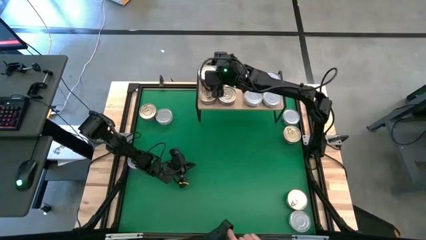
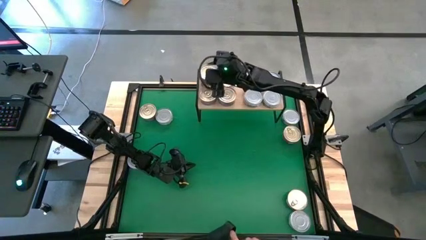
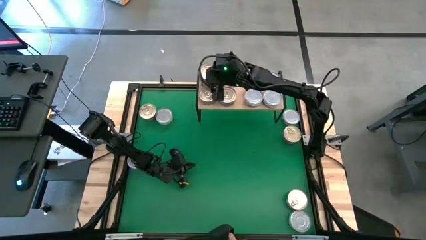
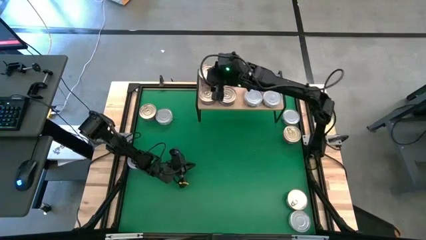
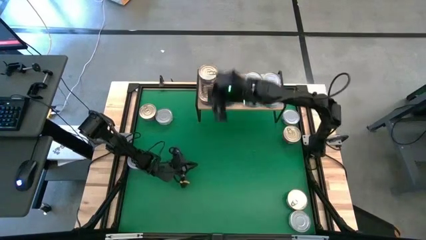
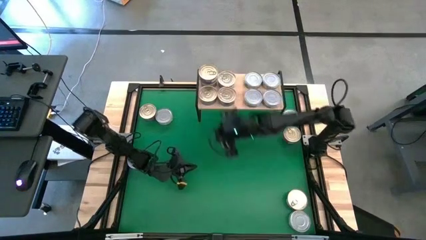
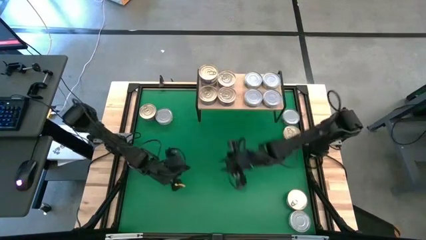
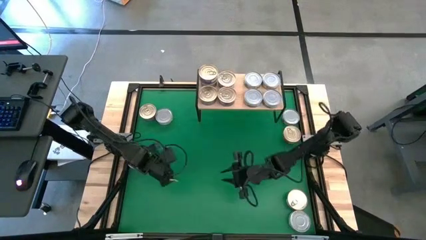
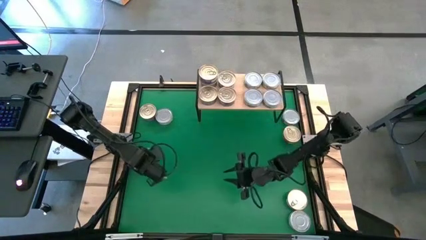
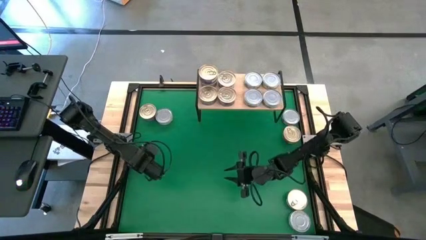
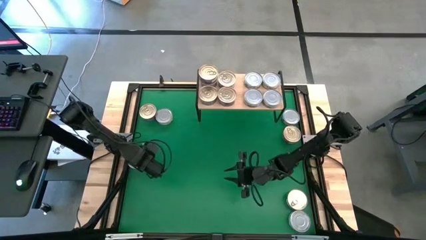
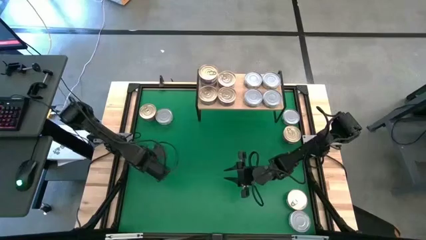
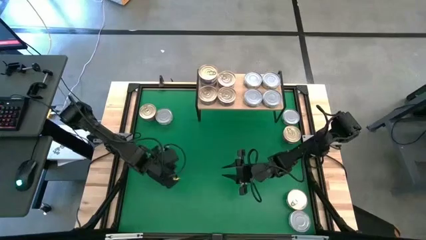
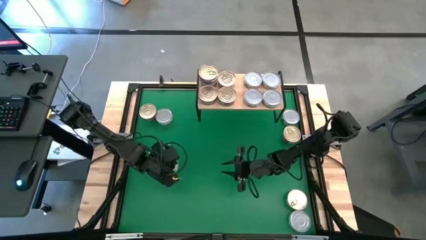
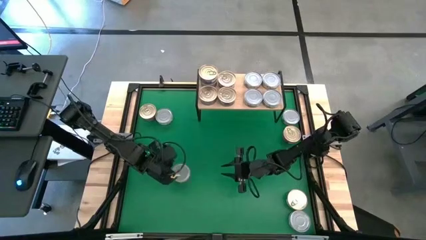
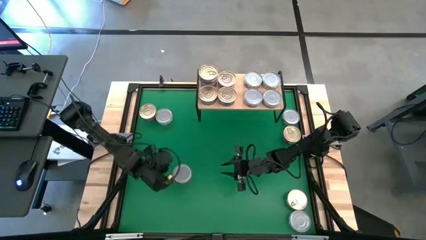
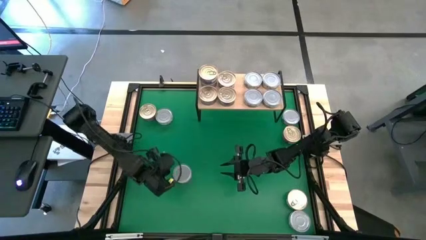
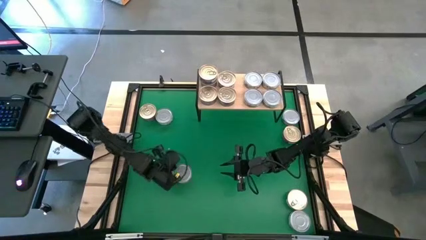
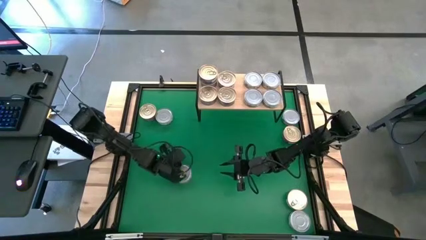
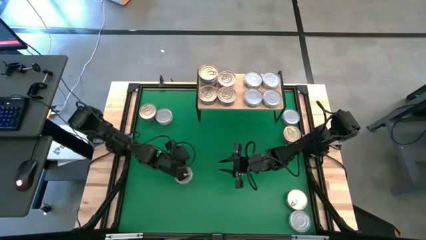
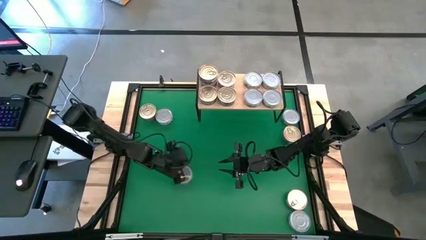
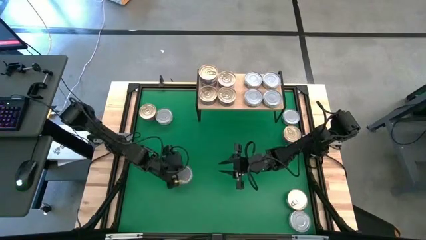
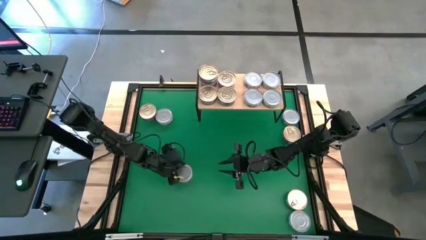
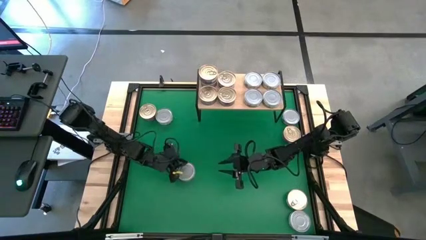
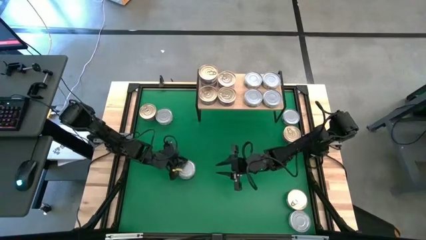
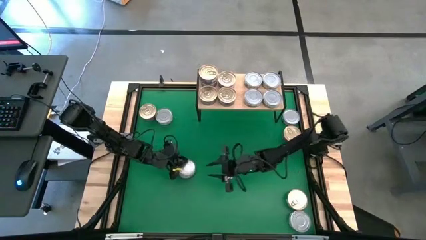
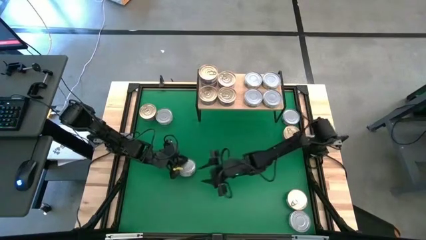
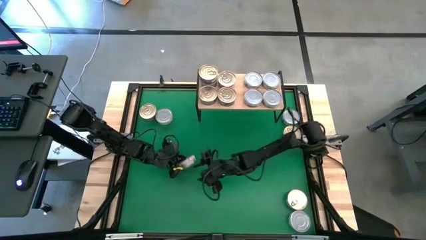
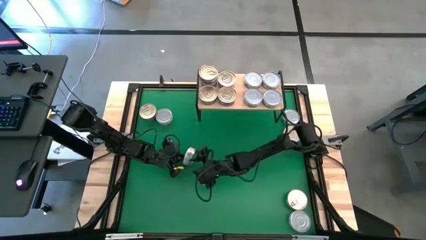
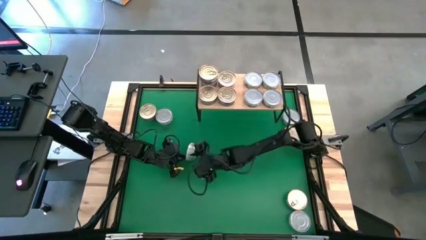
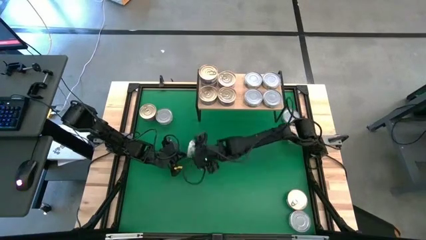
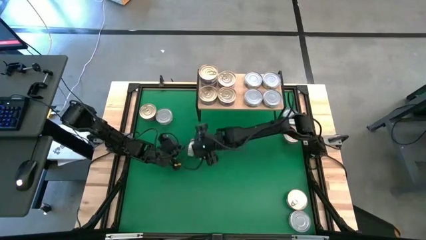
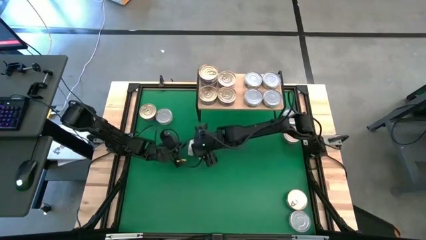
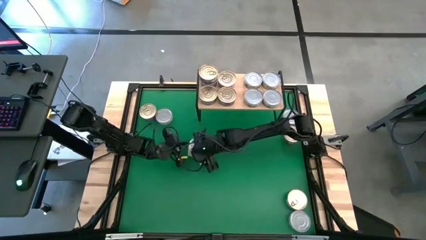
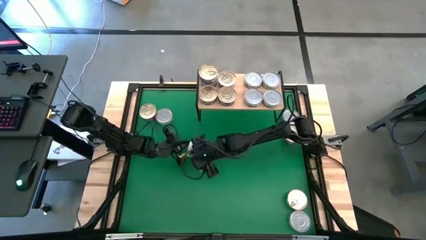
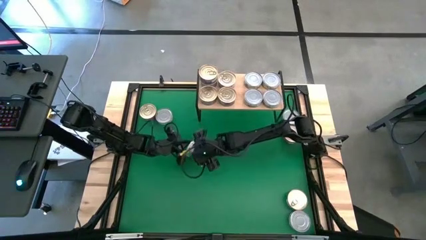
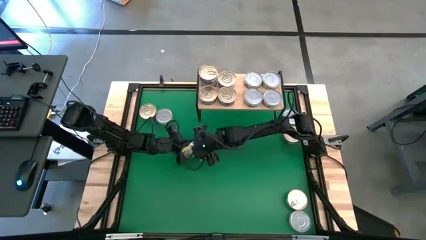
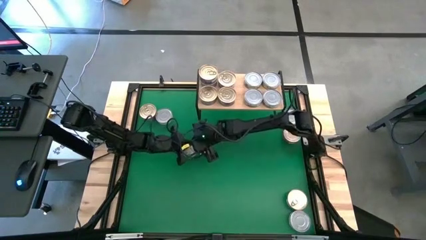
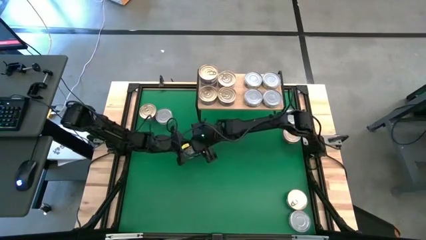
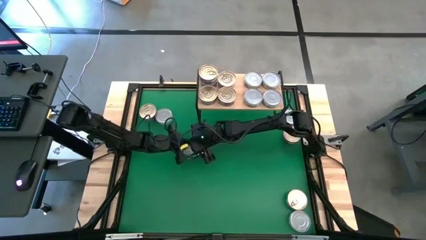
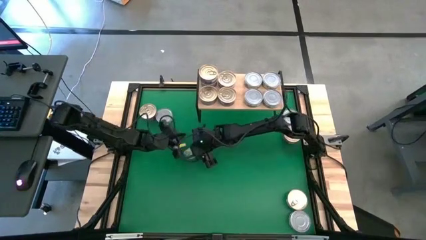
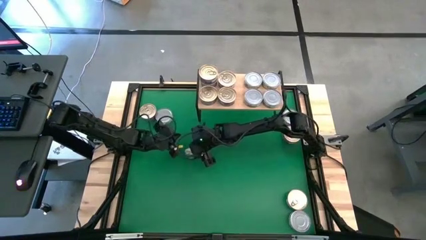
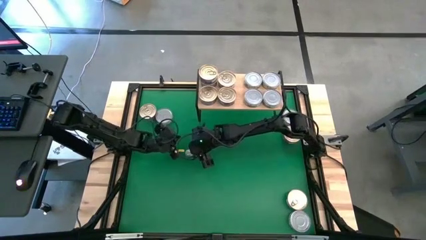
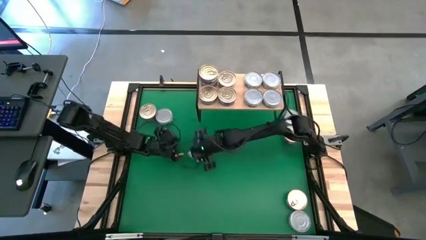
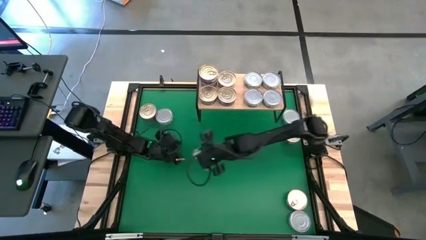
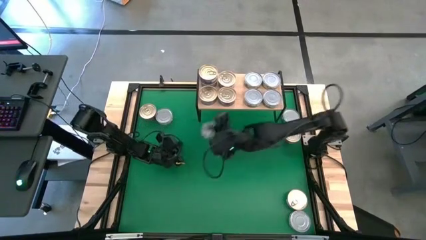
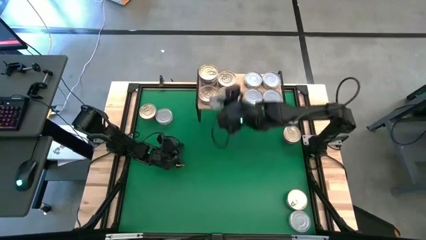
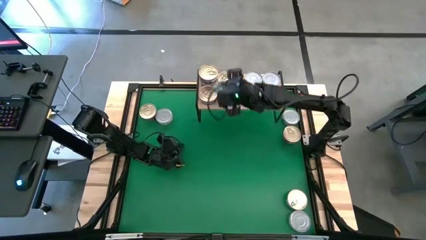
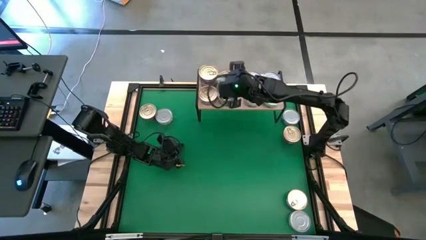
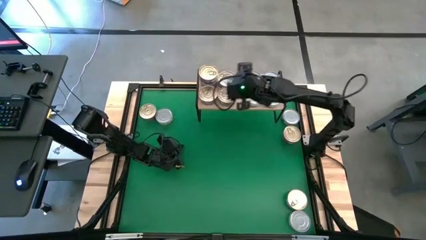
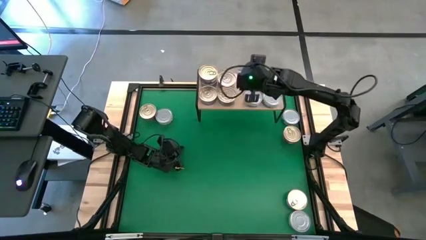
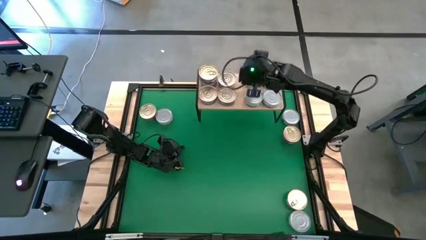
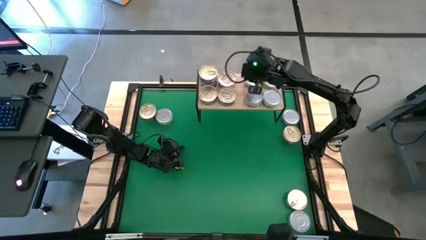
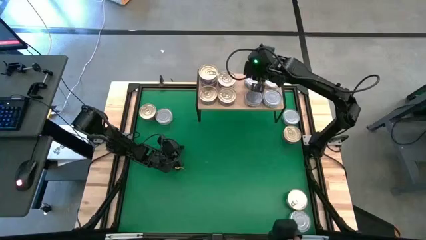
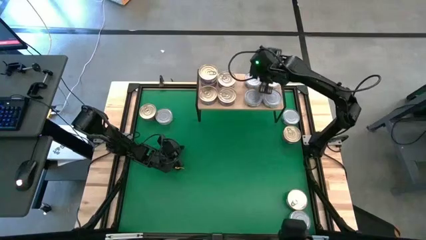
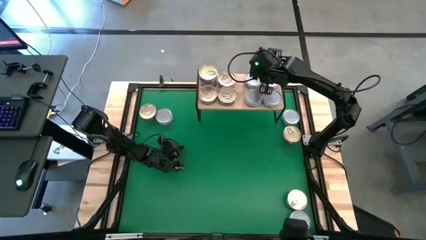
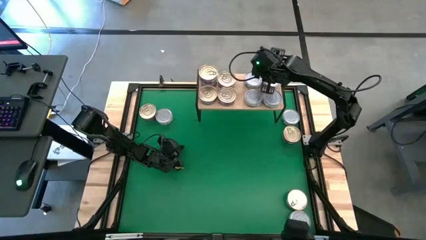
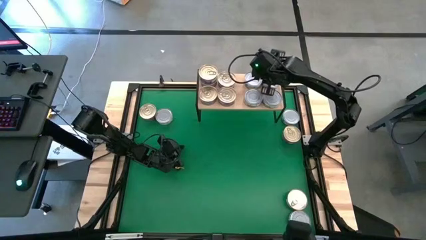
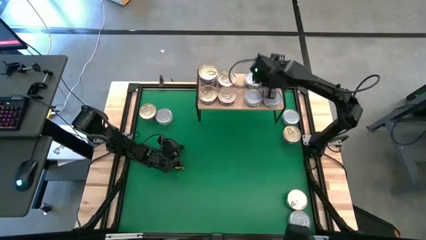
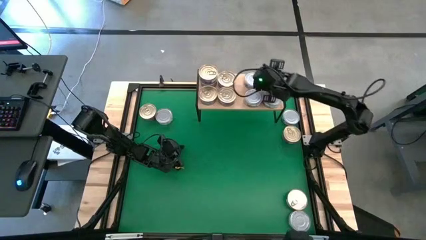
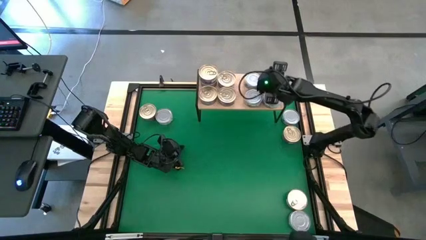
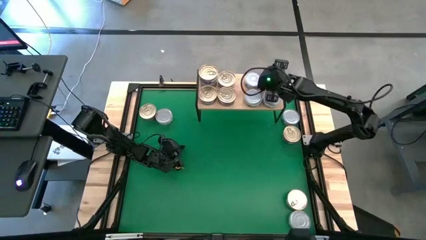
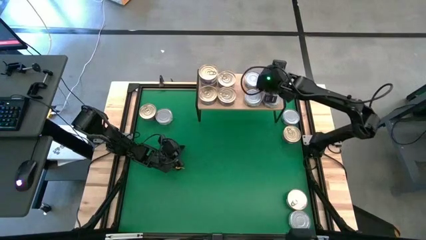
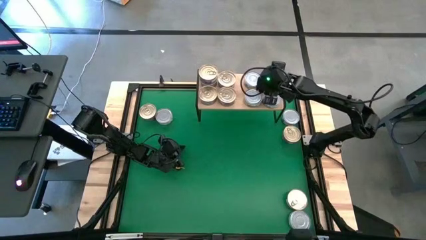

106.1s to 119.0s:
Task: Stack canned seafood by type on shelf
Stack the green tuna can on top of the green tuna can on the shelf

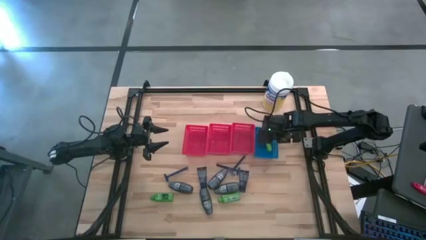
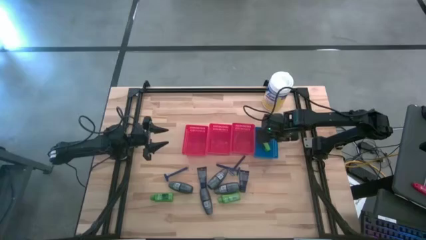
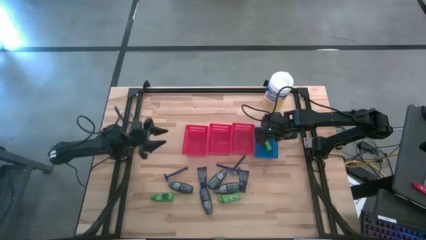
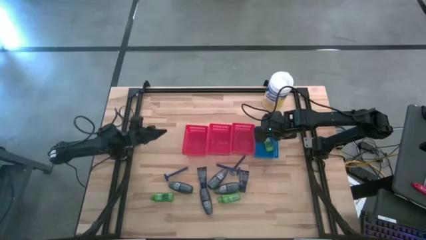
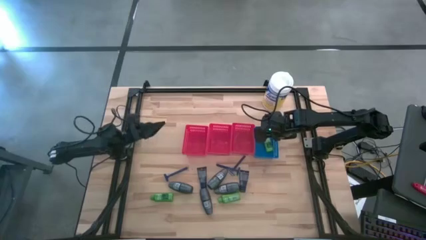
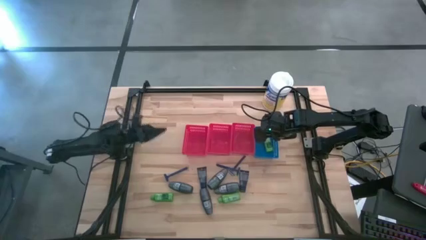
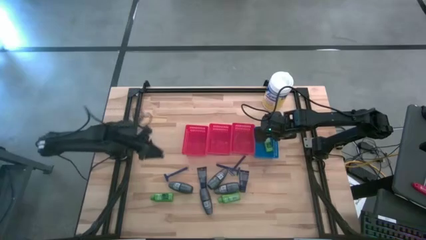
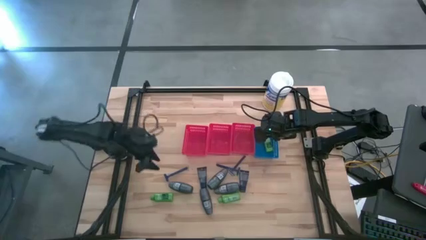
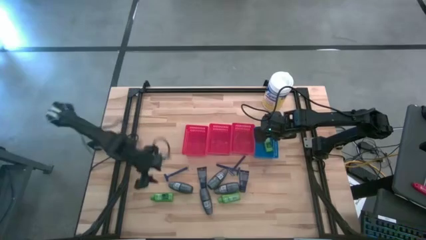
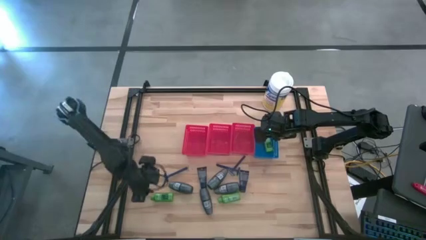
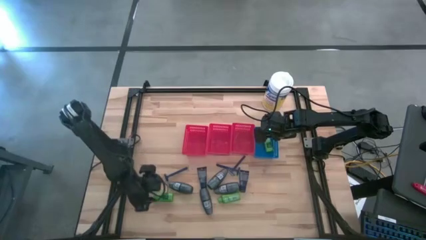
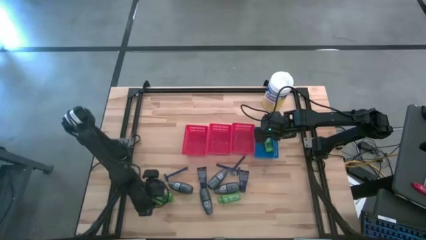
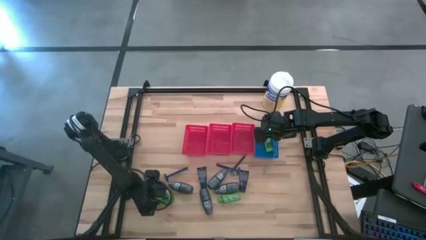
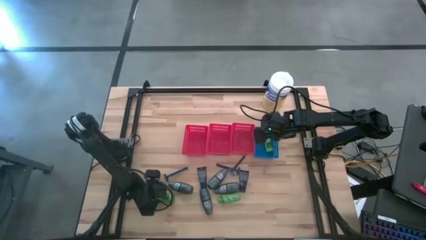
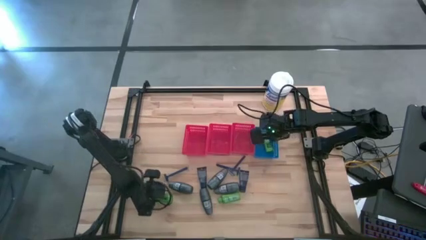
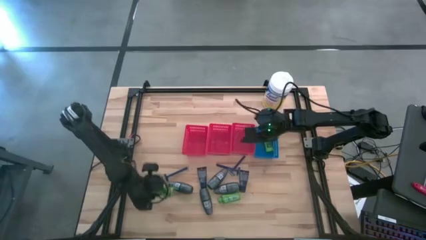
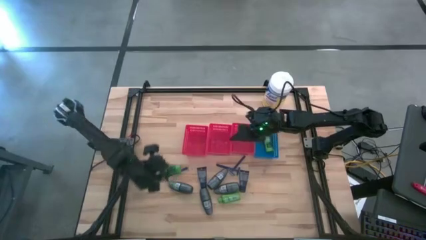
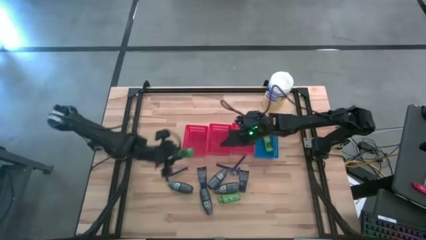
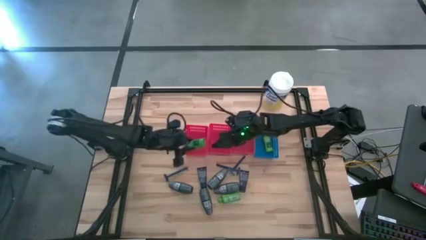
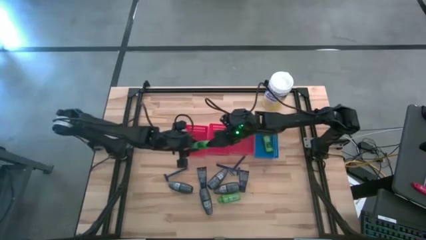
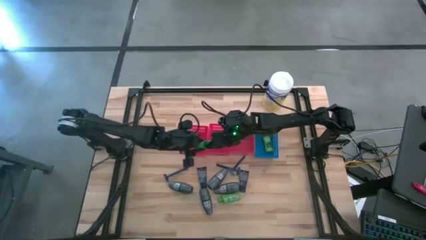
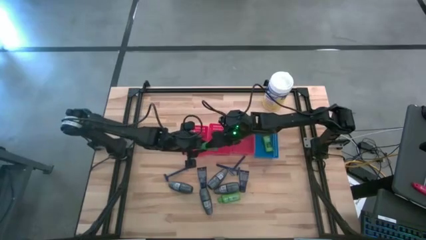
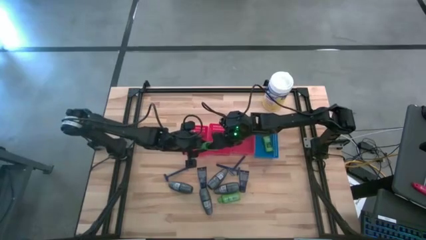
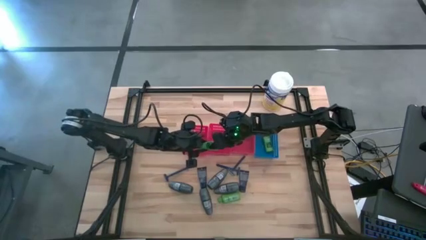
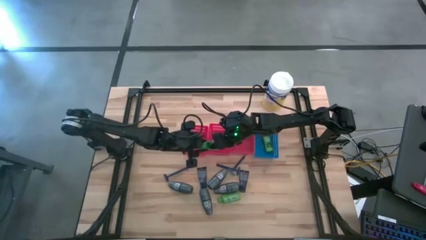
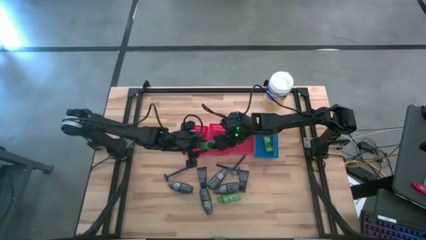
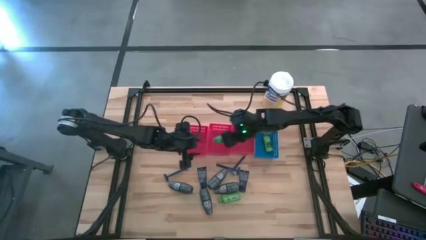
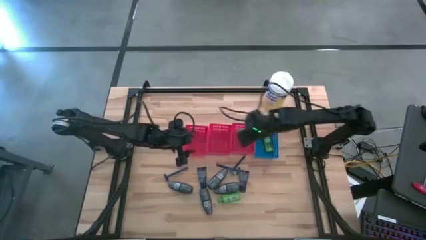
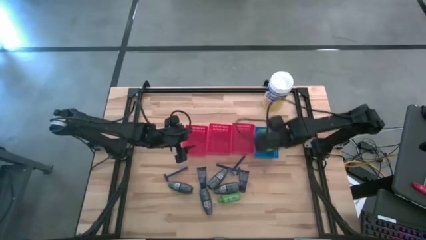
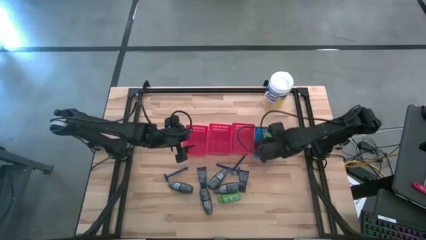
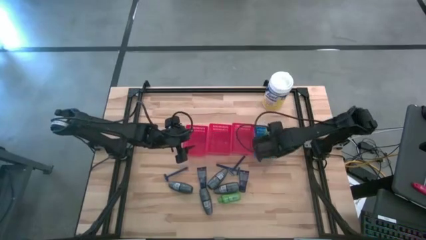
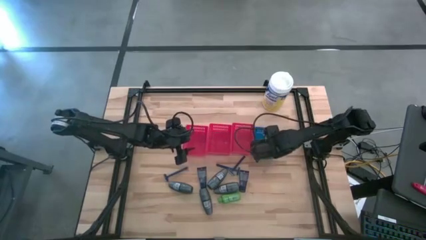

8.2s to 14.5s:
Task: Pick & Place Travel size toiletries
Put the shampoo into the blue bin
